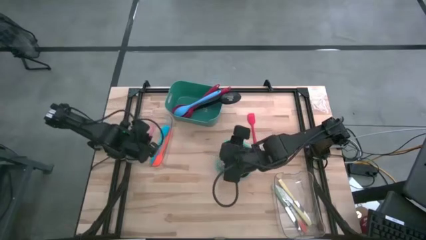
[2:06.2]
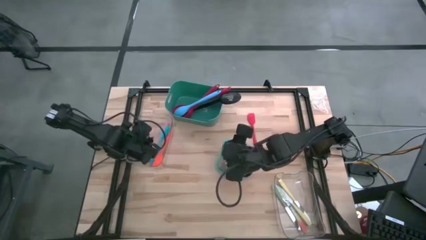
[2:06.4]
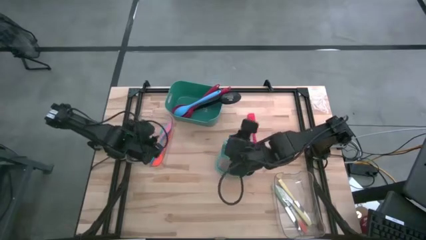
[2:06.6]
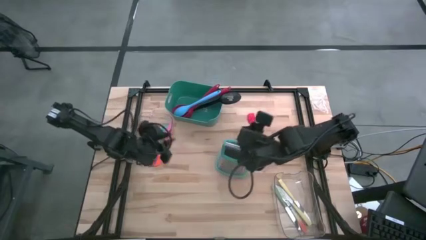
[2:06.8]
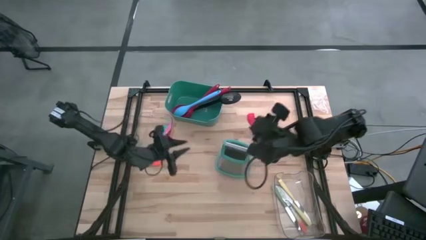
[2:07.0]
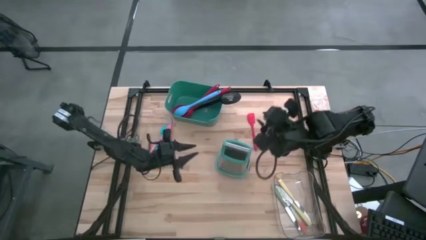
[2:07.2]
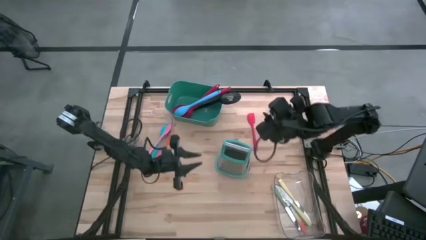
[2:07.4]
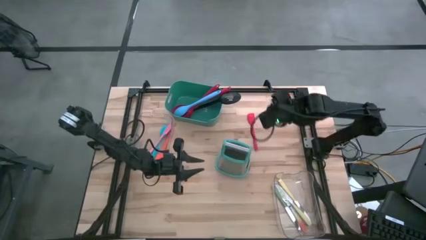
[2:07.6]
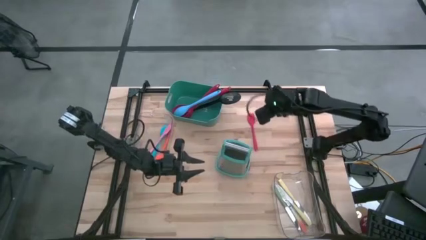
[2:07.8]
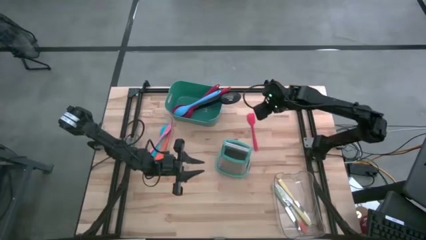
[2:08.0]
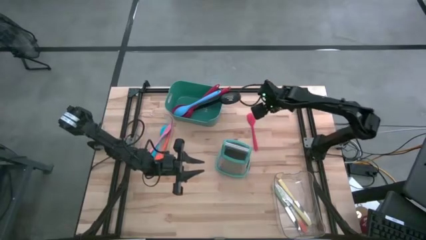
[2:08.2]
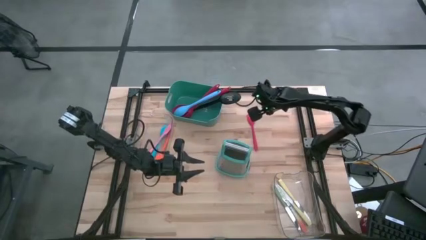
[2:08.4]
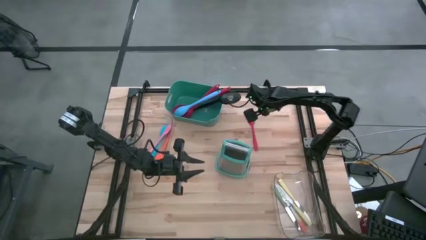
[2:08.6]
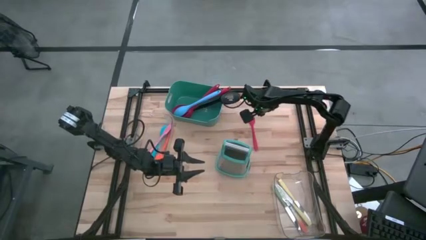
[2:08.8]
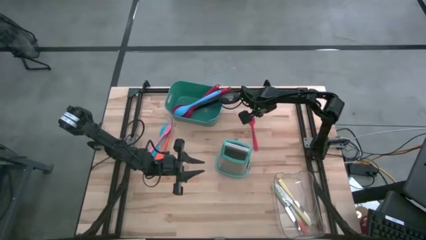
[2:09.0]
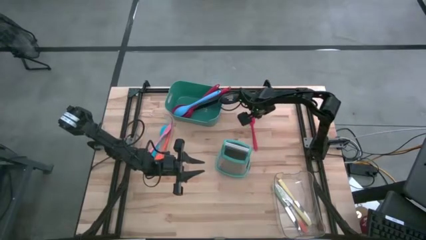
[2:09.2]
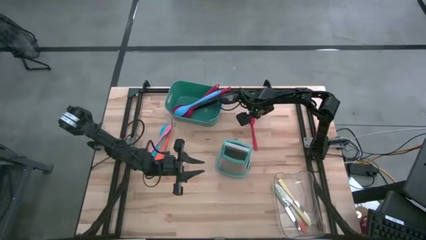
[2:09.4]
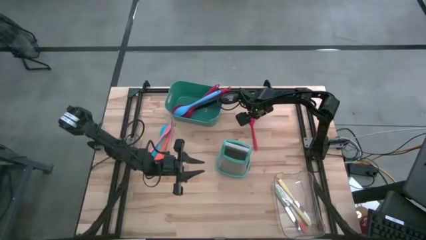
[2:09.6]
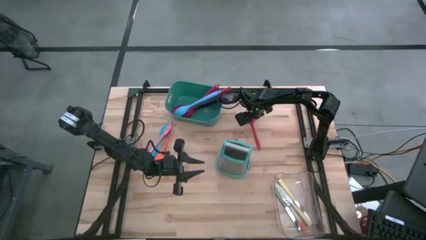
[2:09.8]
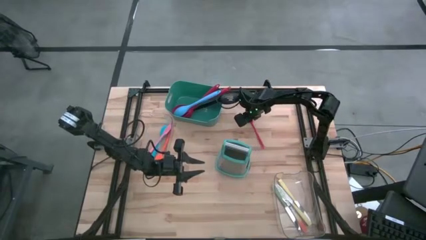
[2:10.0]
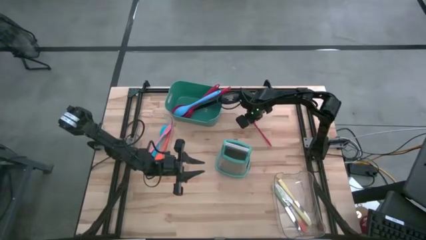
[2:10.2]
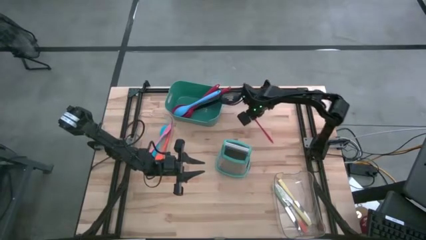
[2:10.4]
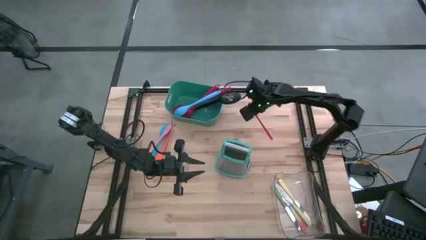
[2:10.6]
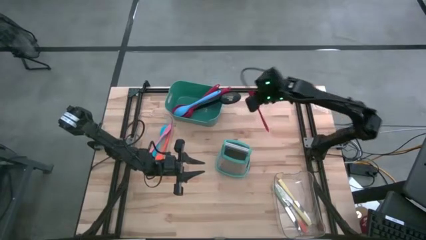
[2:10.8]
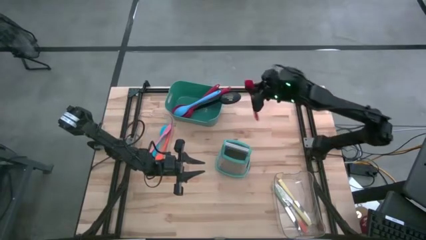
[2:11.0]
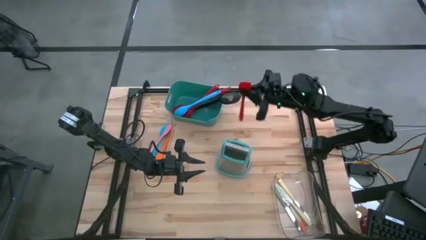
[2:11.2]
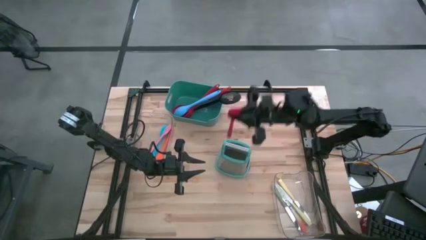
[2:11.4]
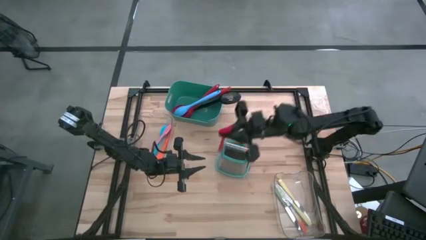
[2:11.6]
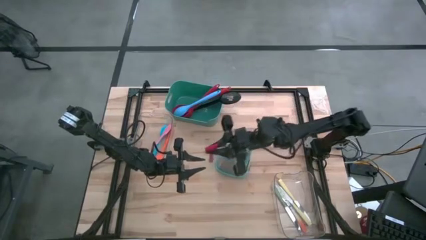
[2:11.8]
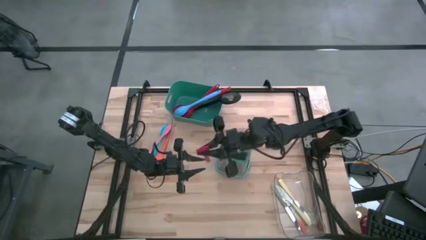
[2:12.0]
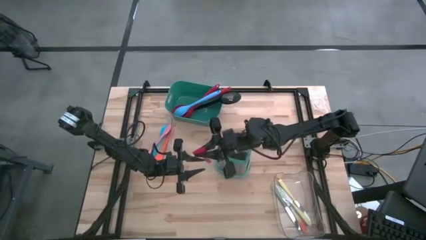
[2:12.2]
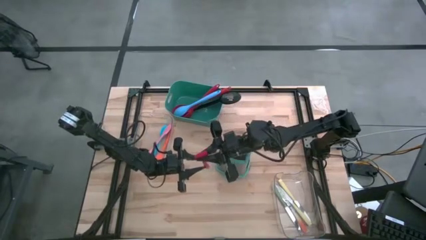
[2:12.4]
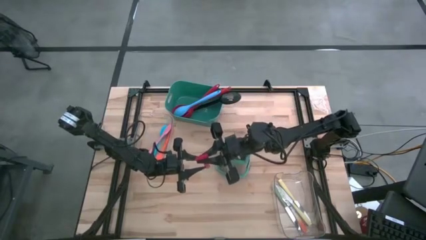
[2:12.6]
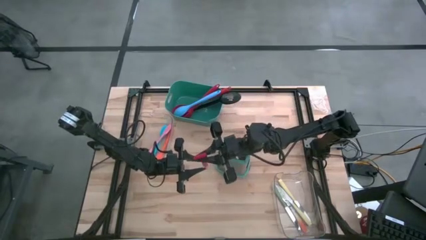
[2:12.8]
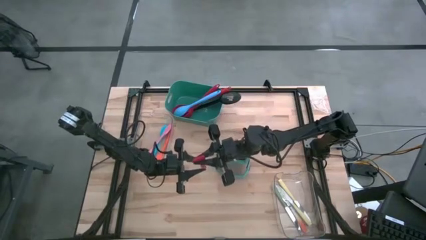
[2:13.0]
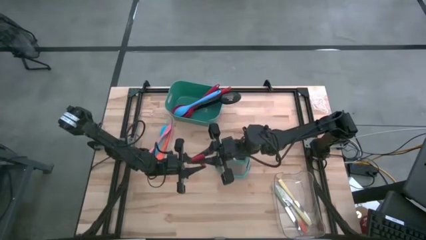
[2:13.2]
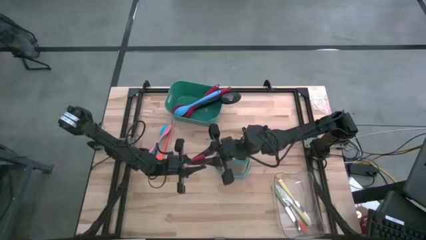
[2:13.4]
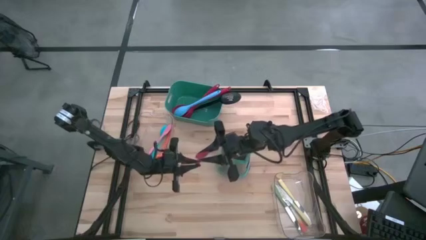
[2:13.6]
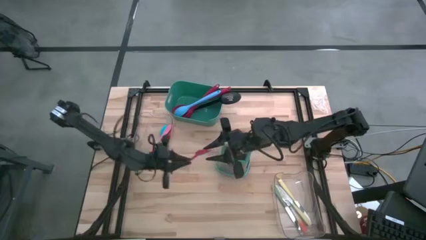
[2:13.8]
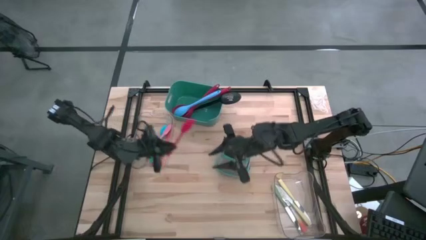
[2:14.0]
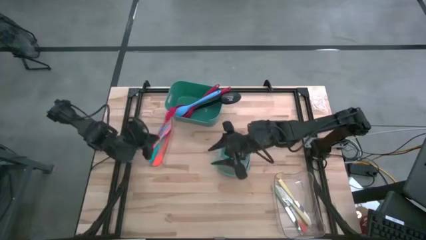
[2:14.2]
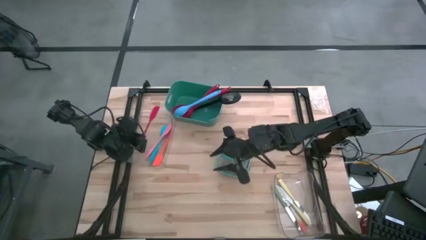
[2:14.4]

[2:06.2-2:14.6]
Task: Pick & Place Kitchen Items
Put the red spatula into the top transparent bin

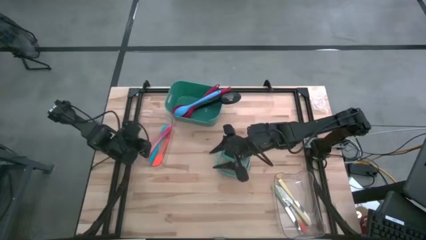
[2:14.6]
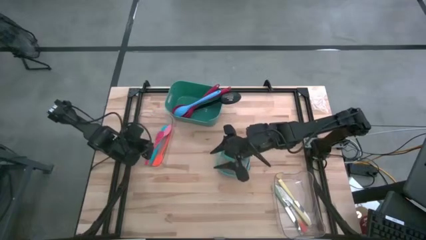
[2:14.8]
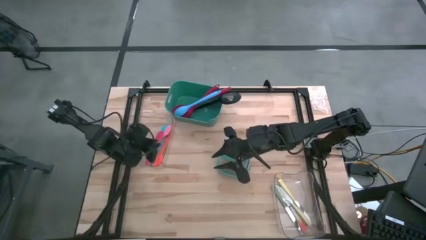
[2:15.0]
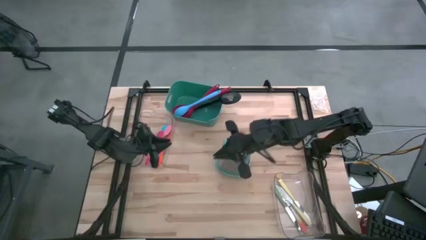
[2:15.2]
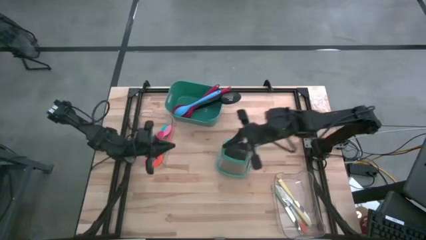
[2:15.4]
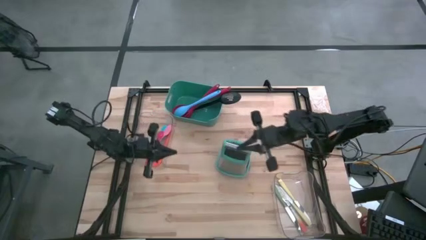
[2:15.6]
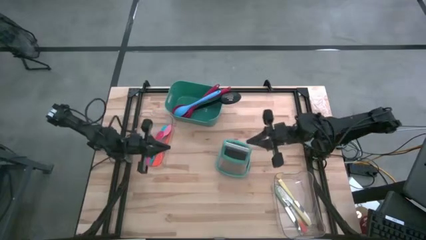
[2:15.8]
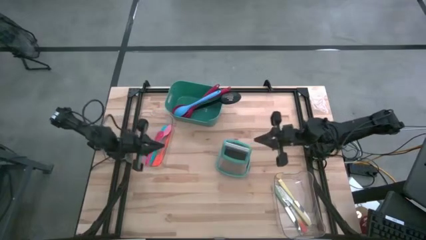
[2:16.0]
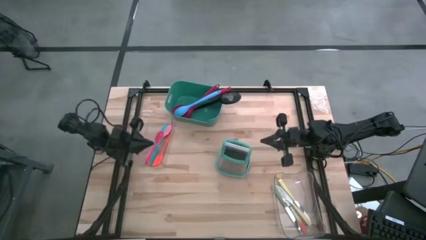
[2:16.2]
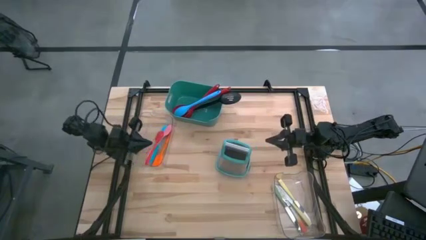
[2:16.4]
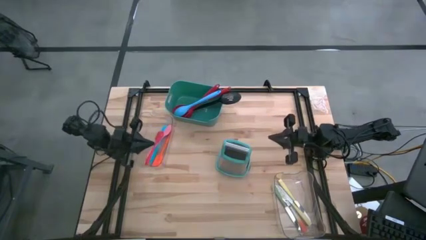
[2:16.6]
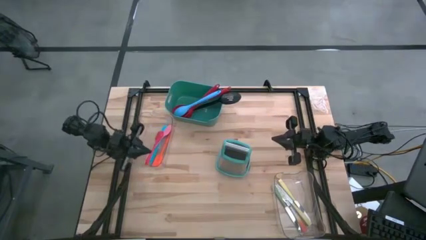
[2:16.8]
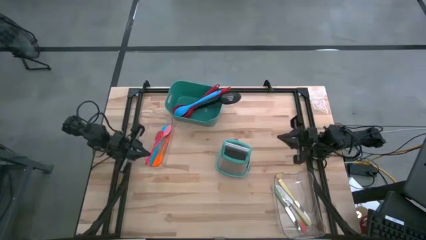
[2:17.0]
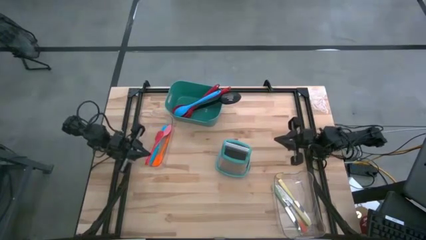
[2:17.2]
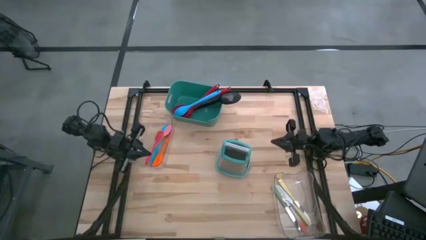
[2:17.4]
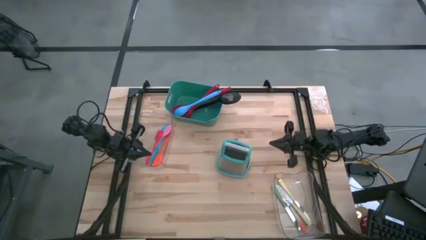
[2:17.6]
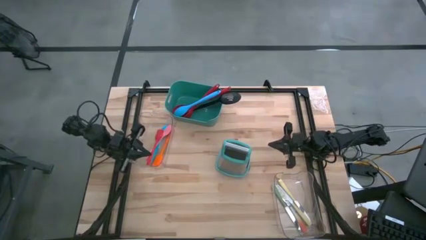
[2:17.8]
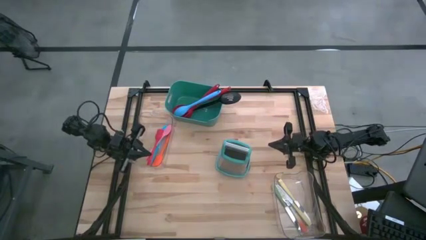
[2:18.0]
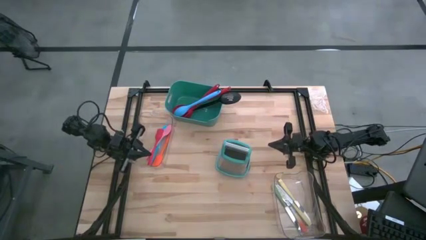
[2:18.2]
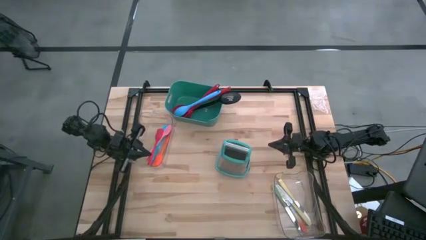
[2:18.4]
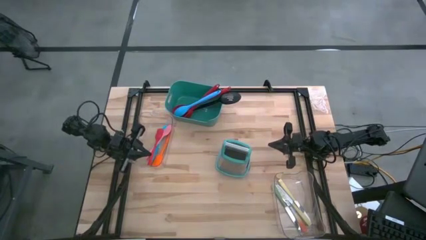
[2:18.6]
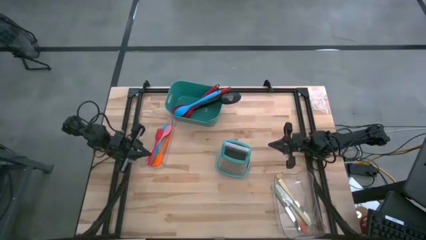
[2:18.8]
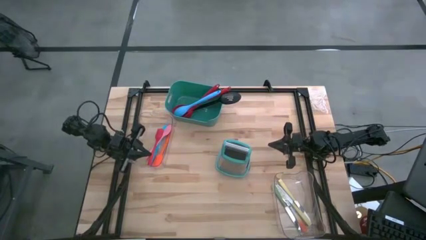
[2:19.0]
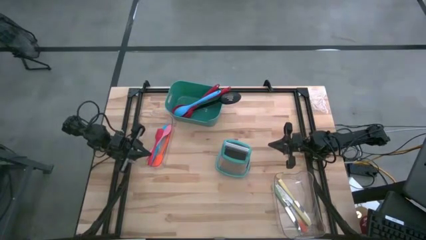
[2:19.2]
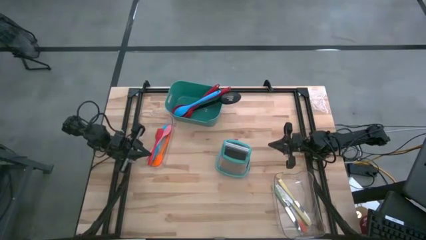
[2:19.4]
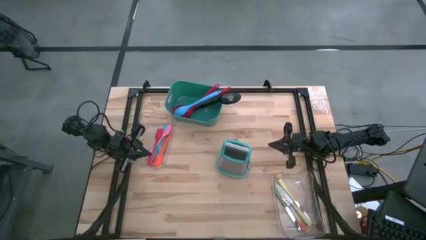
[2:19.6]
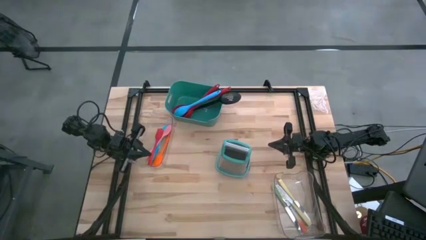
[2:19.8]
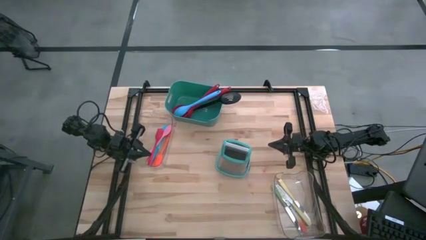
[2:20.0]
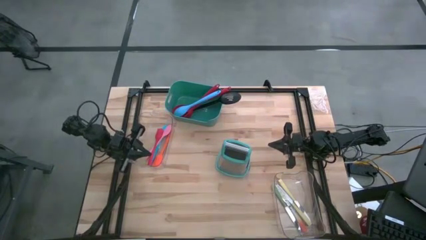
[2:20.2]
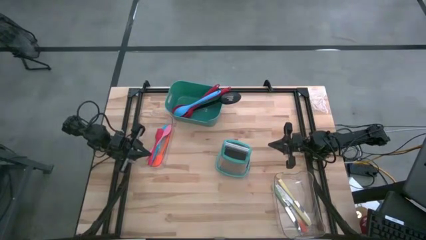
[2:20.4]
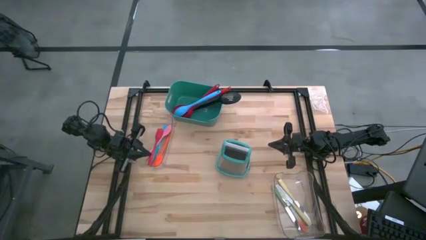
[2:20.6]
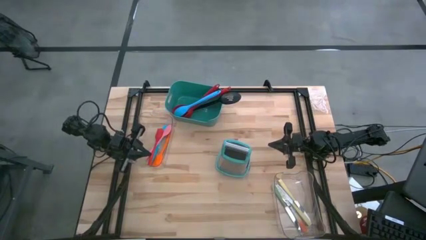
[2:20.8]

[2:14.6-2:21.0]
Return to Home Position
